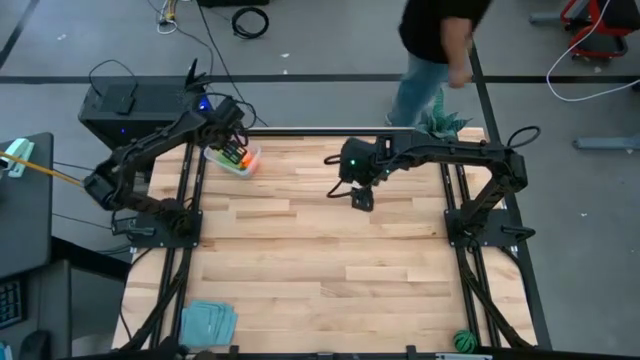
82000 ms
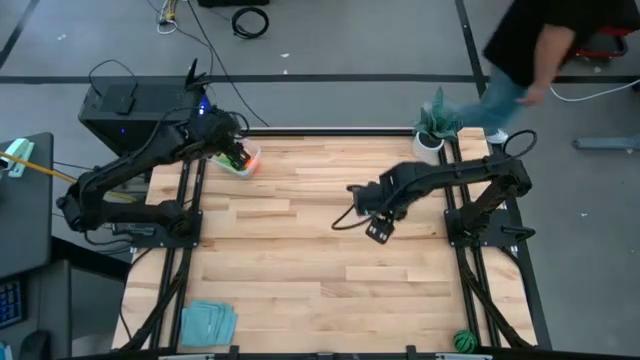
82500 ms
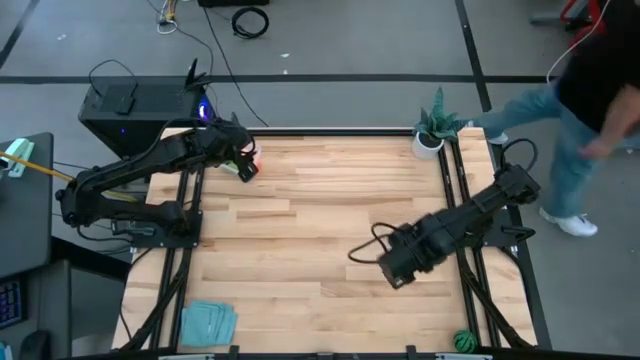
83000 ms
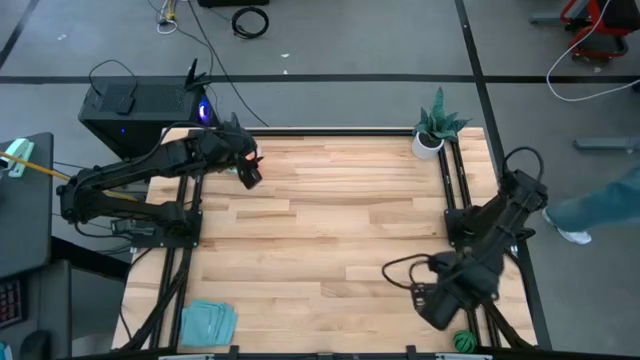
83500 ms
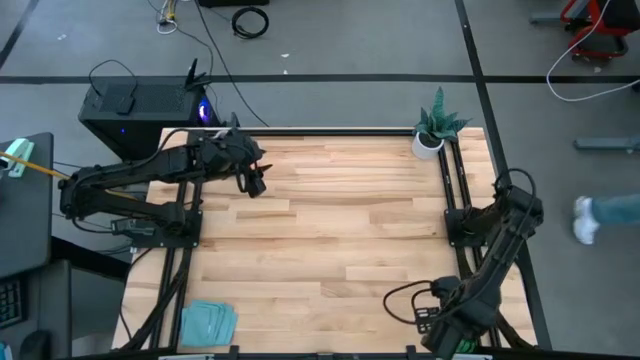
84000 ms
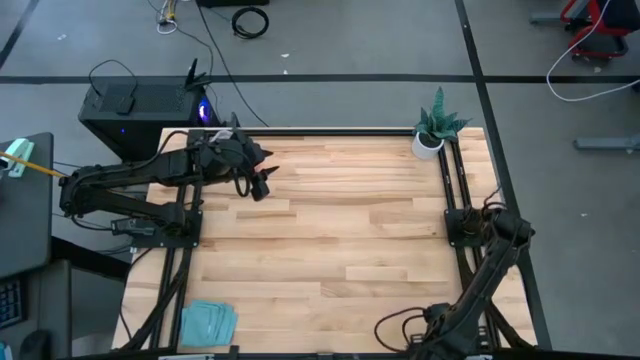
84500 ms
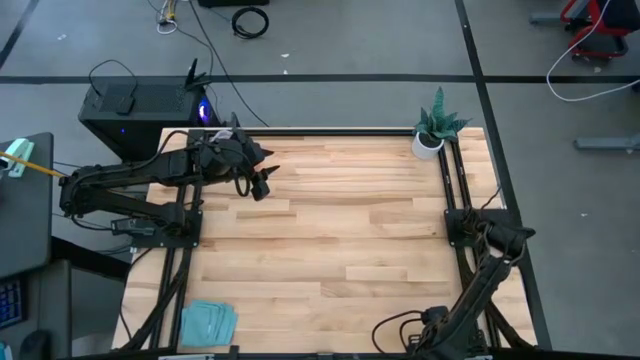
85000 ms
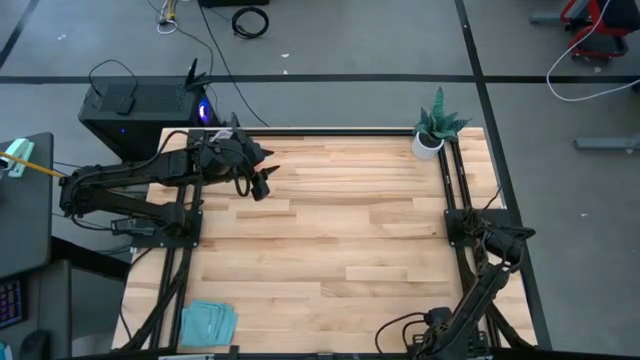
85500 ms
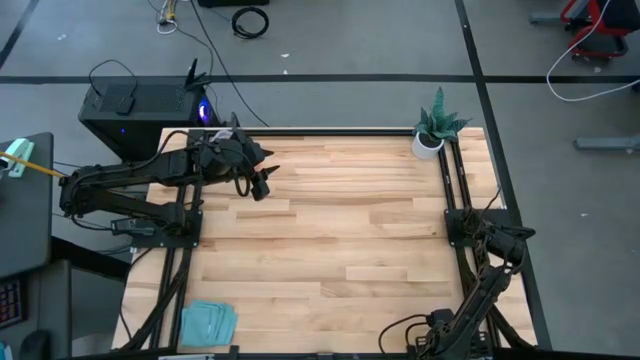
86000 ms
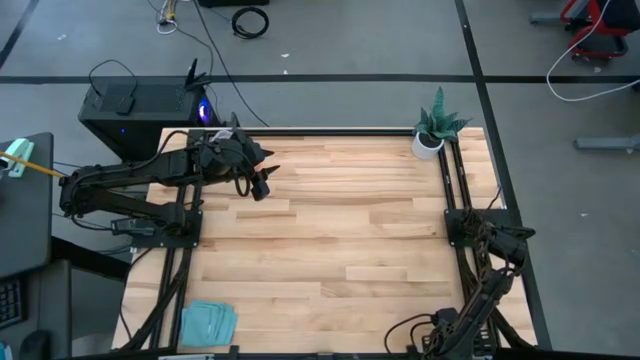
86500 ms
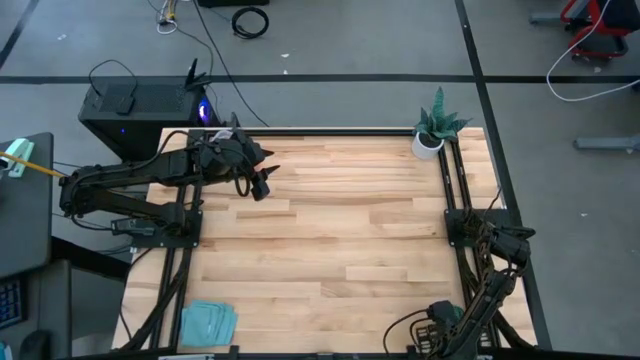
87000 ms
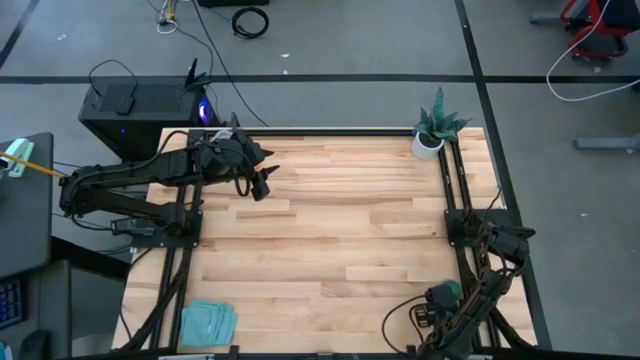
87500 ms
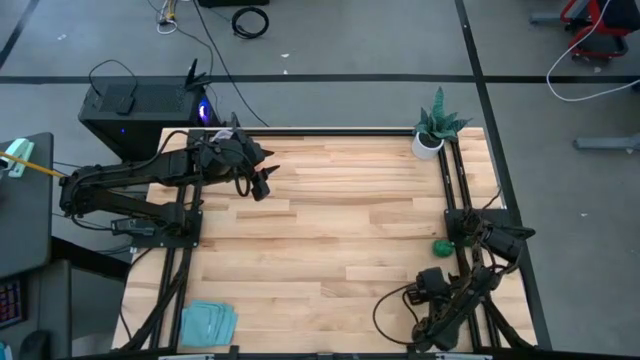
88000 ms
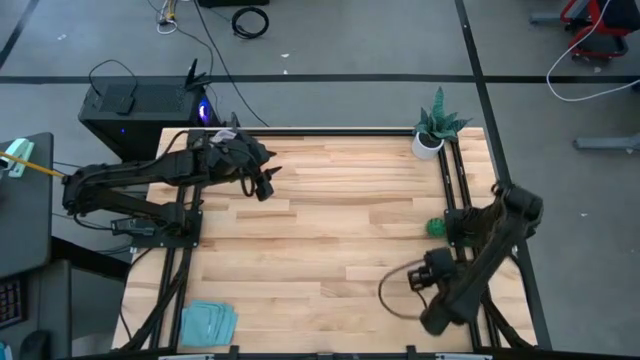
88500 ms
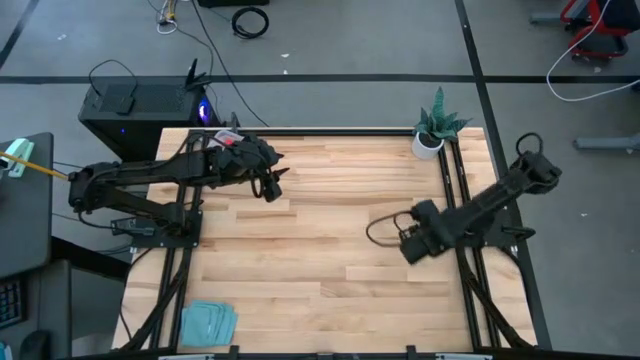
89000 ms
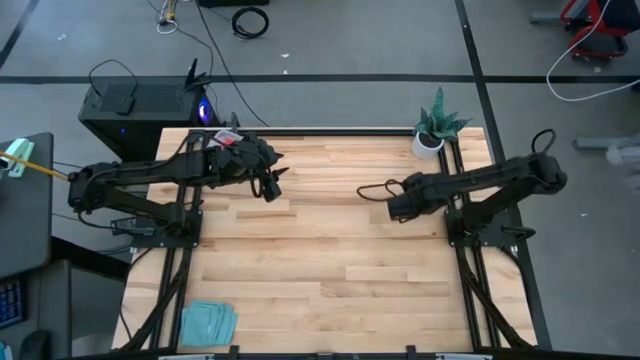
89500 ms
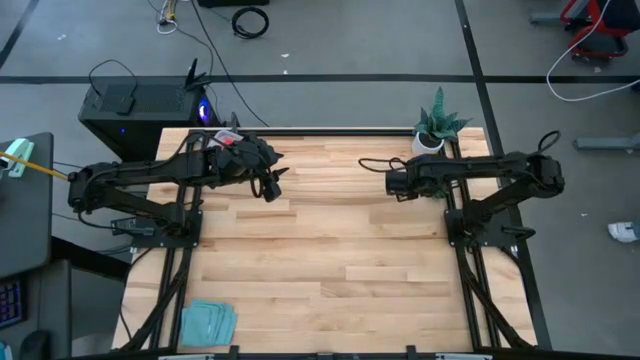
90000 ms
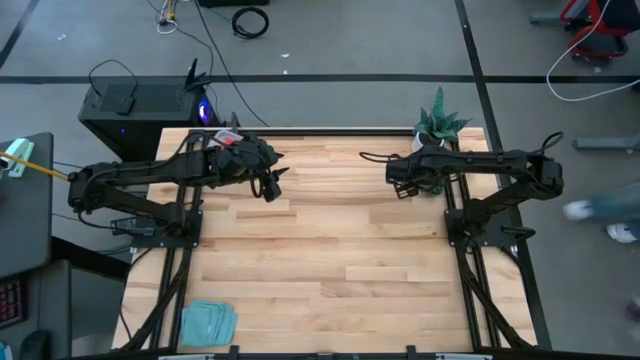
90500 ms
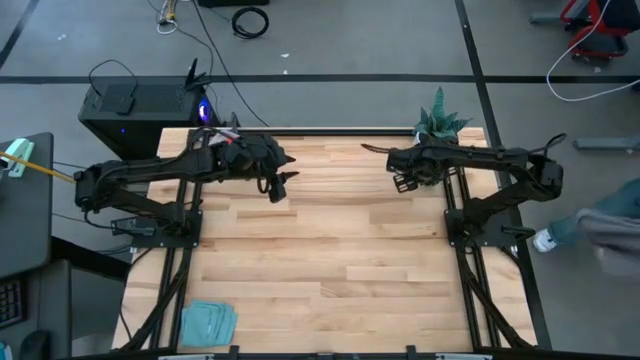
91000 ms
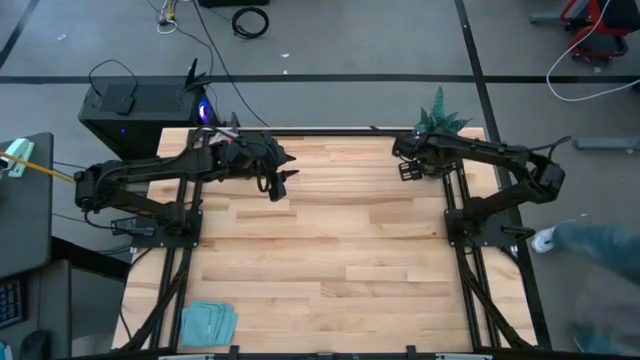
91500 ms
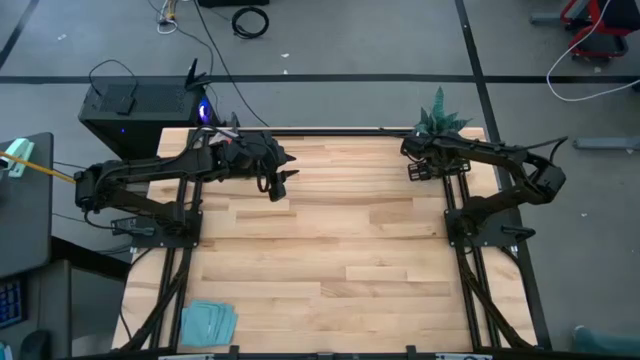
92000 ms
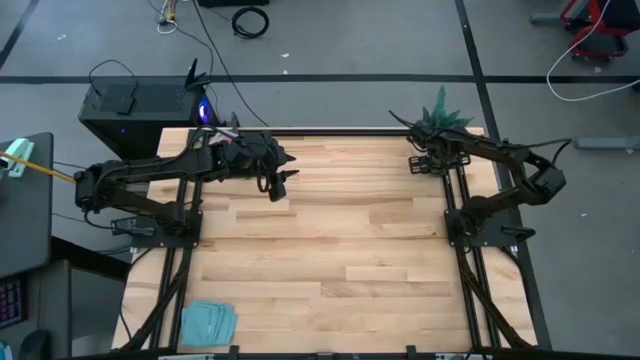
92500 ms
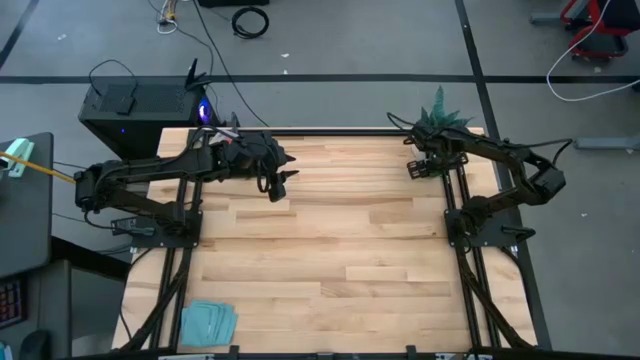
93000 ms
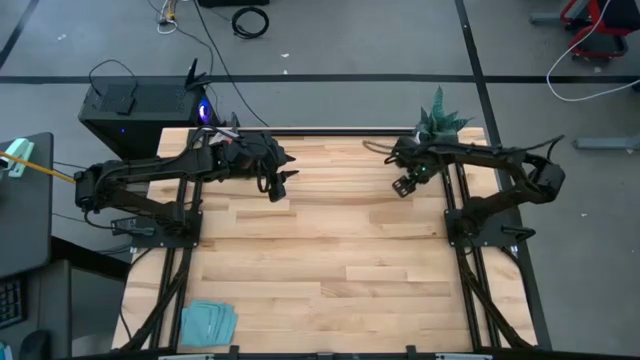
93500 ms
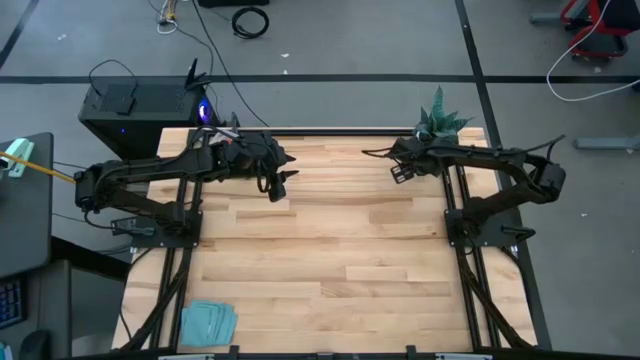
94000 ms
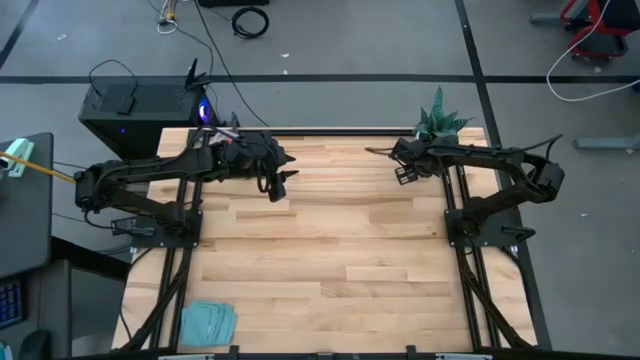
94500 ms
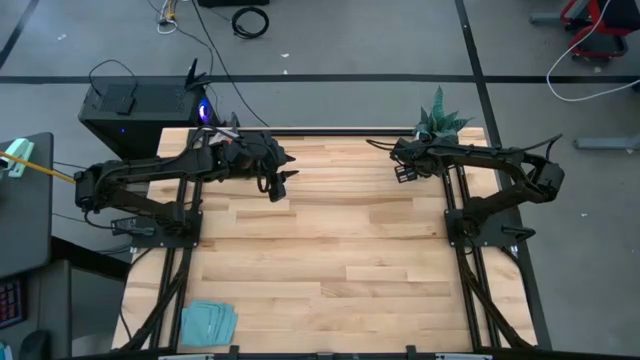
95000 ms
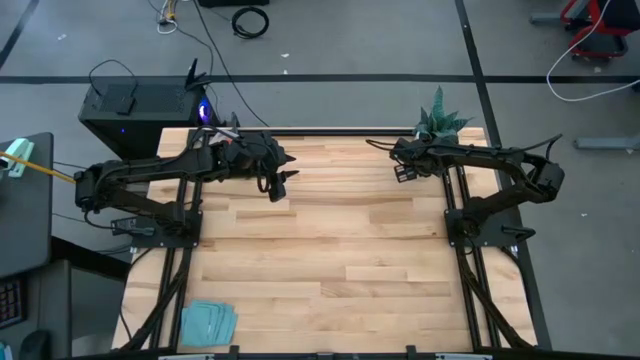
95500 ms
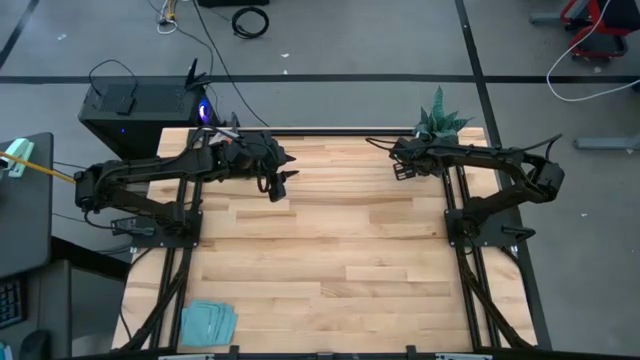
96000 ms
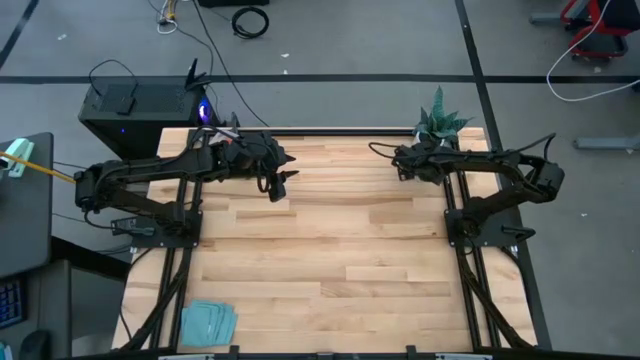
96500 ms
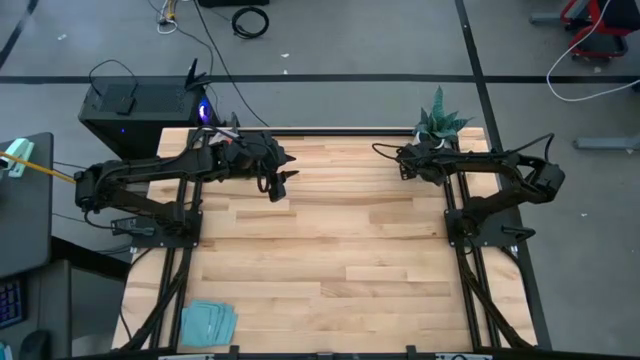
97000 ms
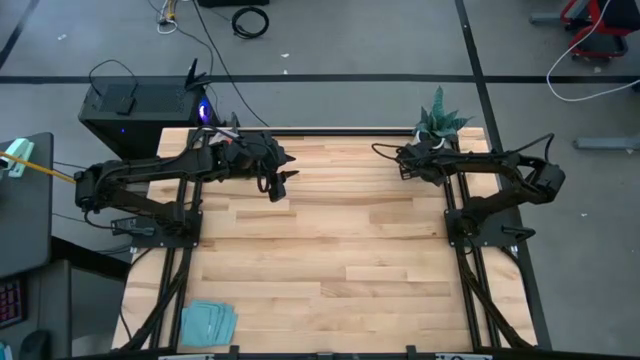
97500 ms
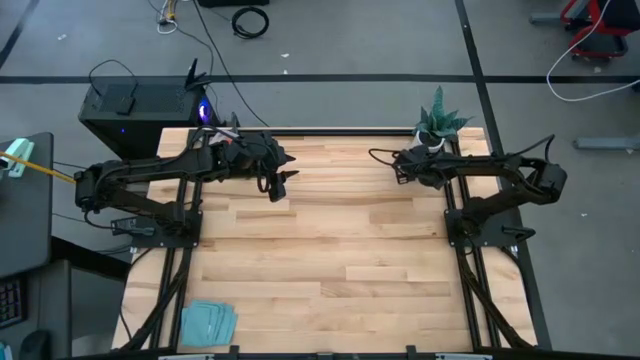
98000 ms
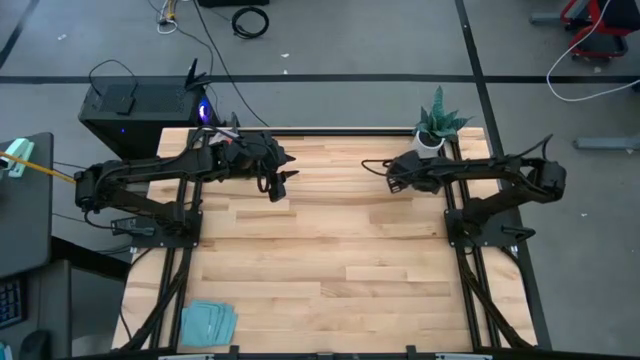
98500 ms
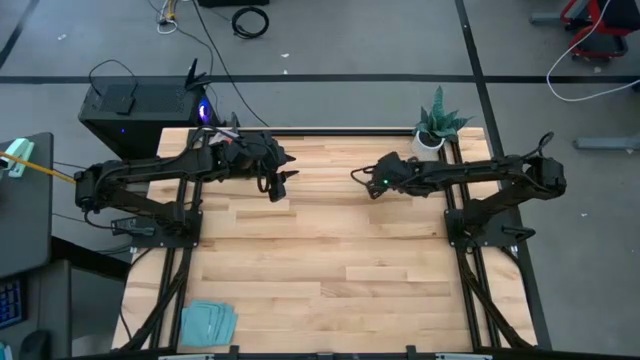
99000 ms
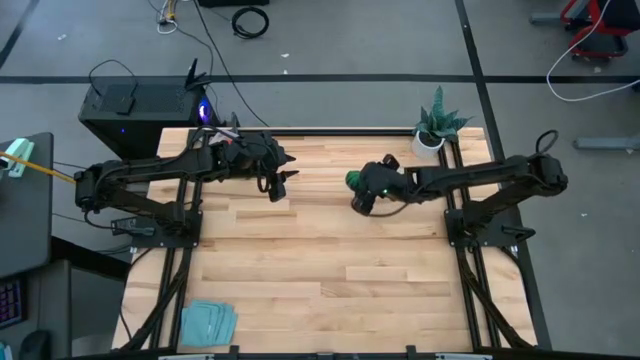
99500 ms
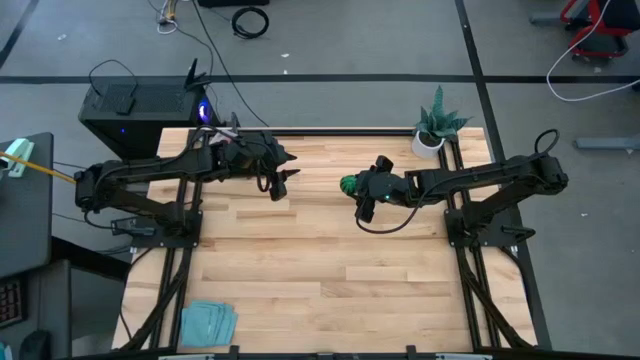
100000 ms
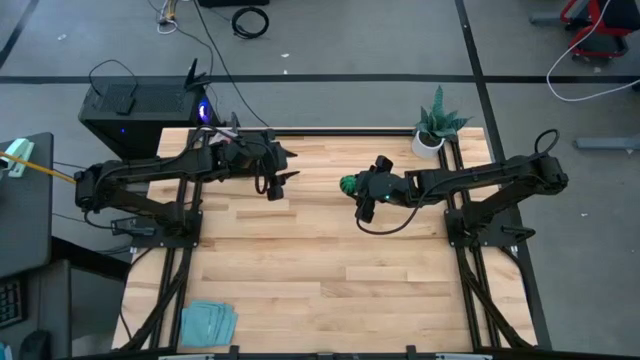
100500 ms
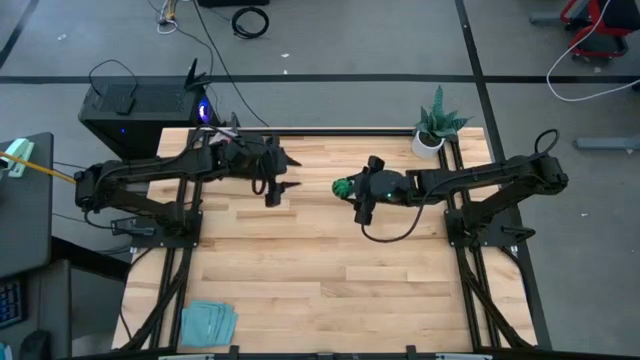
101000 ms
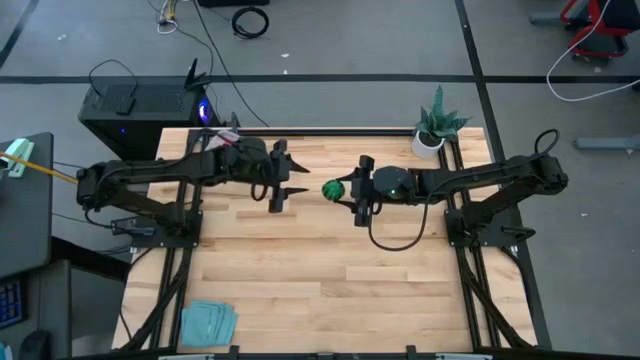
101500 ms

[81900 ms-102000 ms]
Task: Pick and placing Produce into tupperware
Put the green watermelon into the transparent bin

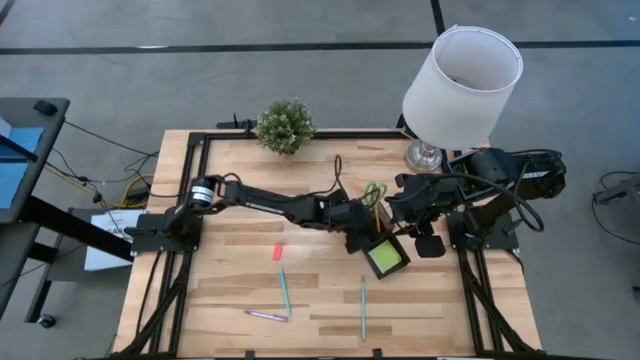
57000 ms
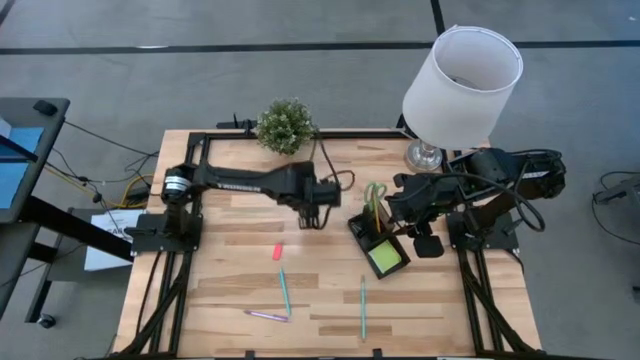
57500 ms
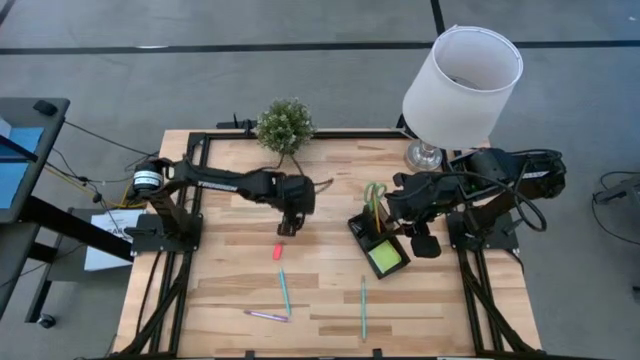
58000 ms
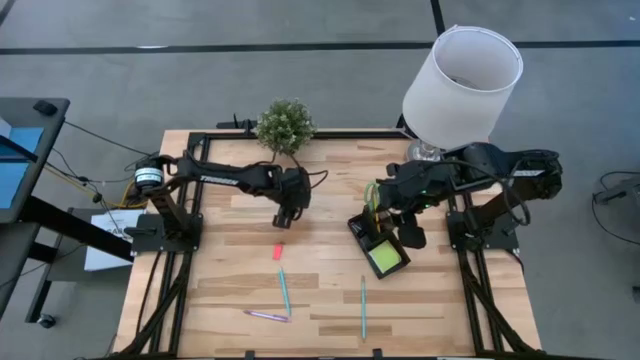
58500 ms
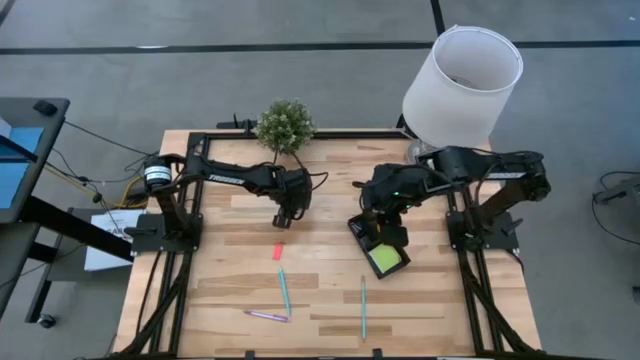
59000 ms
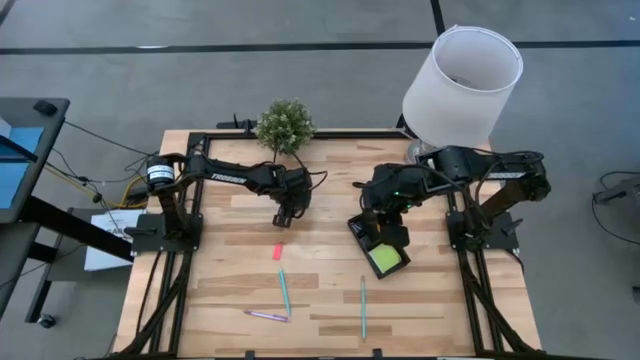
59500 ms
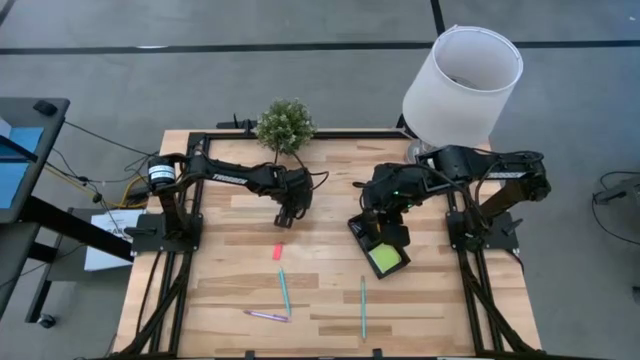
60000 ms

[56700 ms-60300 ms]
Task: Pick and place office supplies into organizer
Put the black binder clip into the black desk organizer
